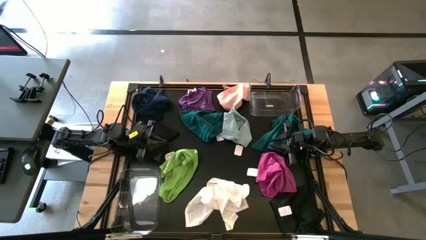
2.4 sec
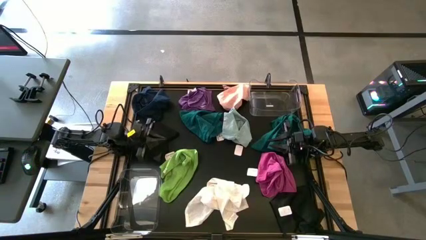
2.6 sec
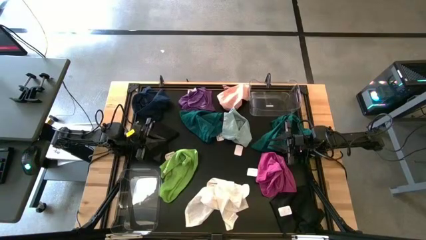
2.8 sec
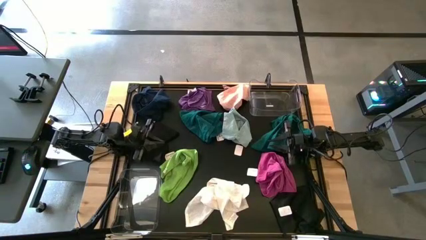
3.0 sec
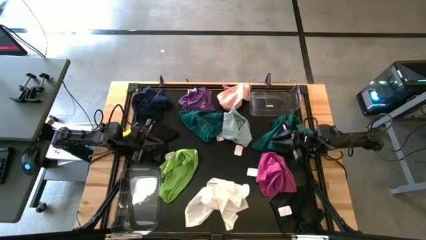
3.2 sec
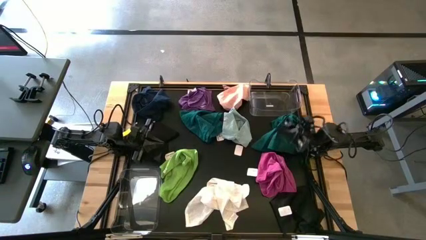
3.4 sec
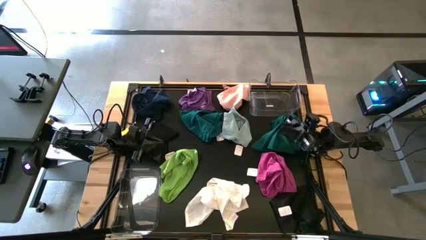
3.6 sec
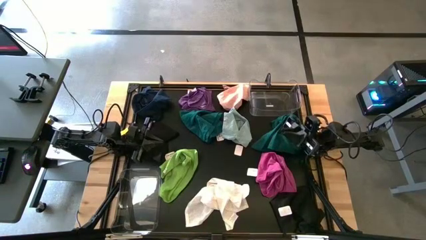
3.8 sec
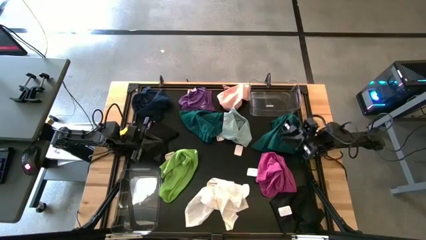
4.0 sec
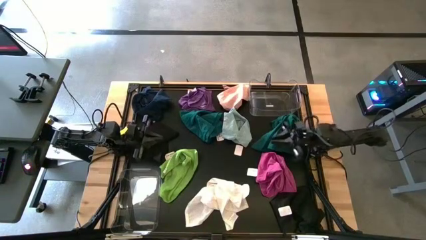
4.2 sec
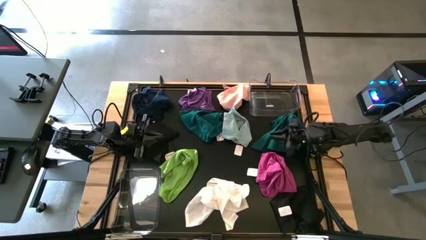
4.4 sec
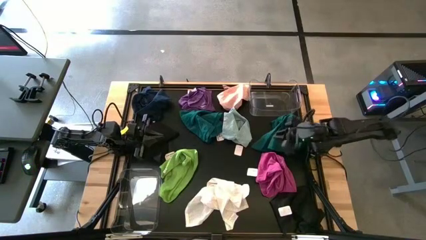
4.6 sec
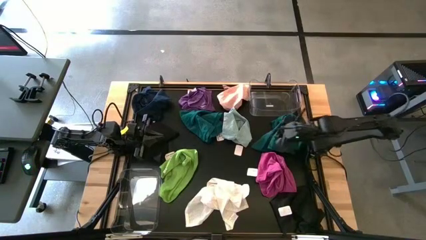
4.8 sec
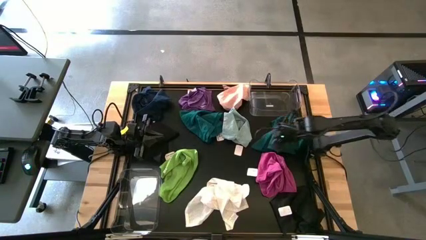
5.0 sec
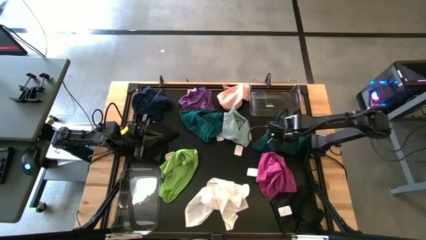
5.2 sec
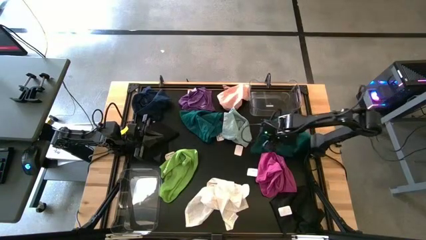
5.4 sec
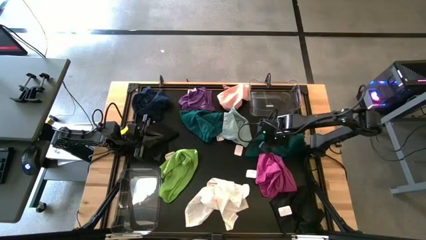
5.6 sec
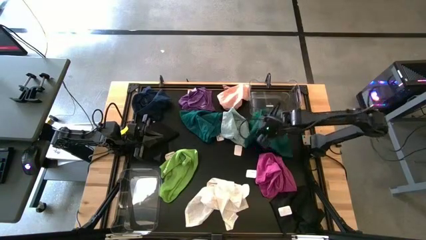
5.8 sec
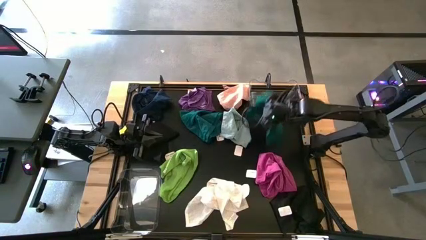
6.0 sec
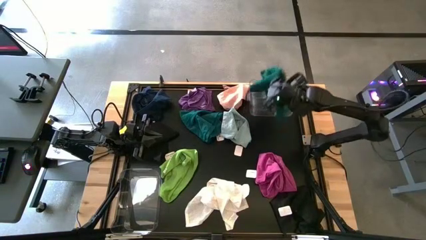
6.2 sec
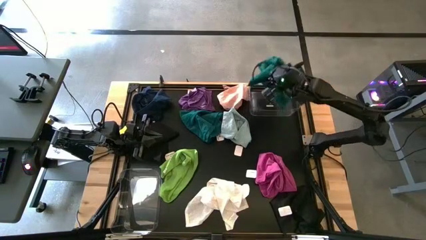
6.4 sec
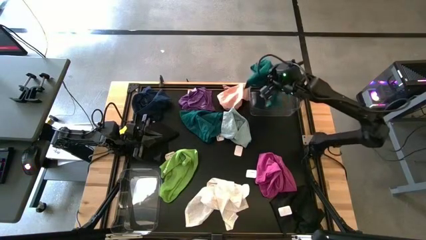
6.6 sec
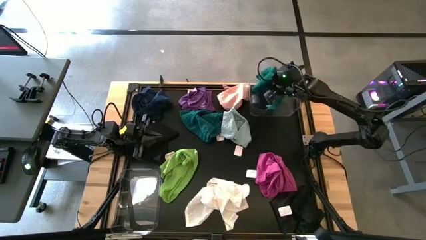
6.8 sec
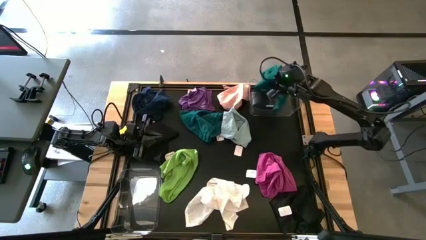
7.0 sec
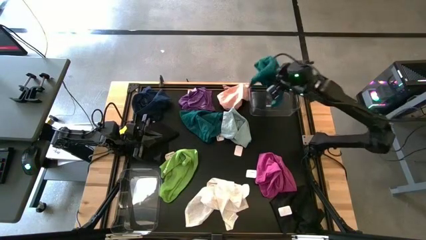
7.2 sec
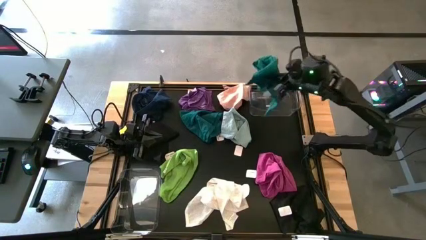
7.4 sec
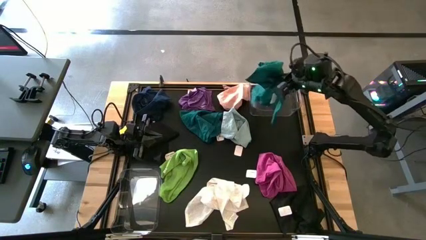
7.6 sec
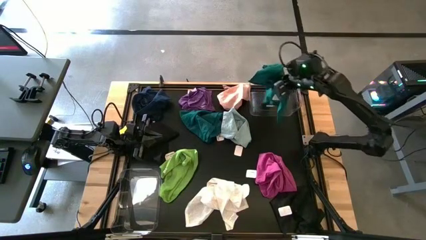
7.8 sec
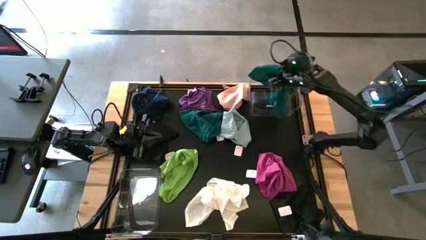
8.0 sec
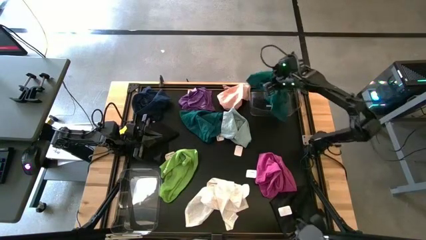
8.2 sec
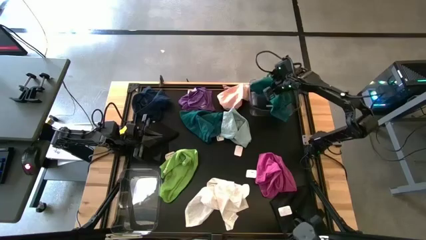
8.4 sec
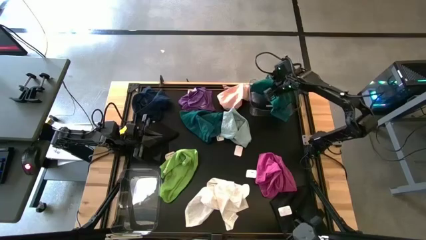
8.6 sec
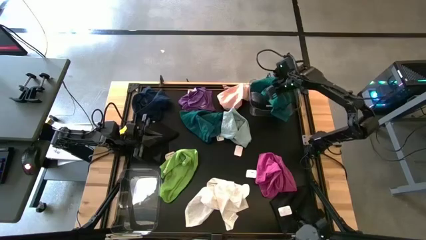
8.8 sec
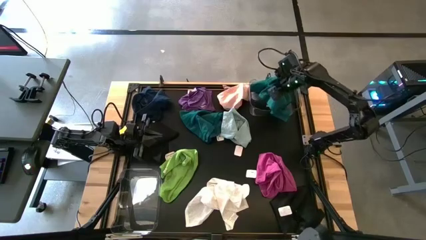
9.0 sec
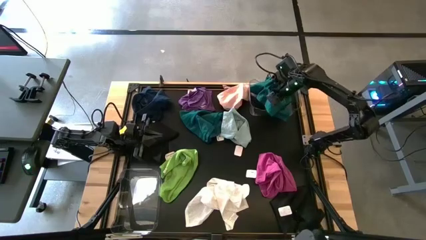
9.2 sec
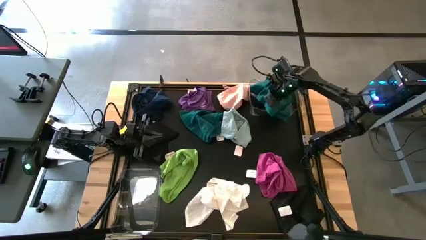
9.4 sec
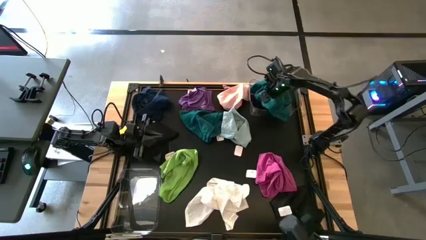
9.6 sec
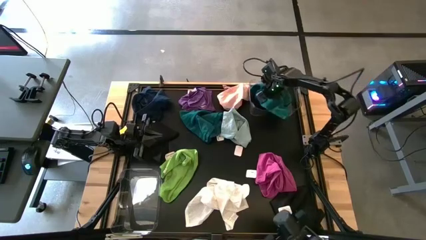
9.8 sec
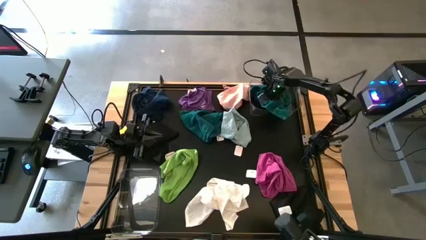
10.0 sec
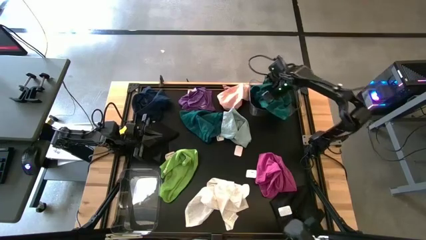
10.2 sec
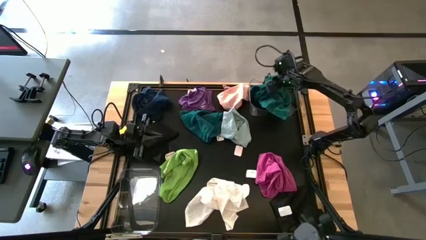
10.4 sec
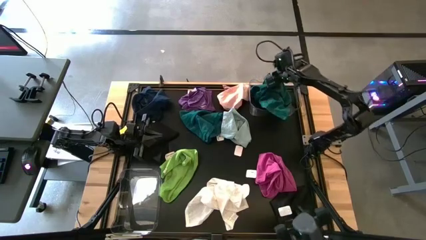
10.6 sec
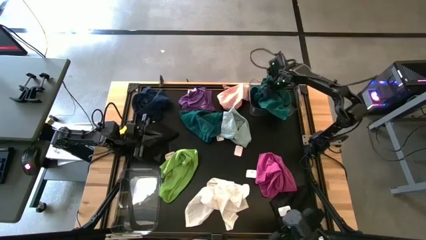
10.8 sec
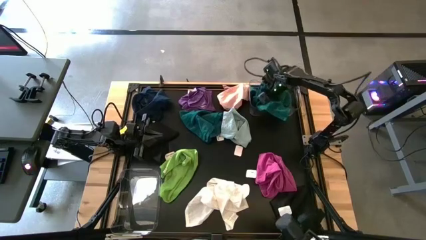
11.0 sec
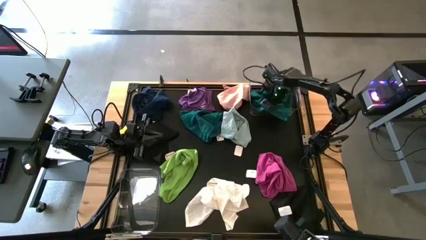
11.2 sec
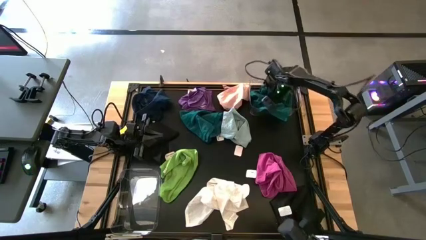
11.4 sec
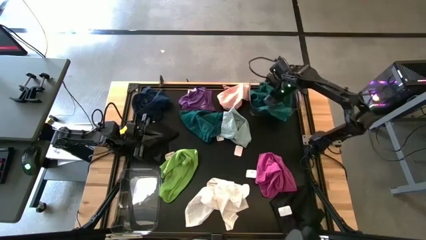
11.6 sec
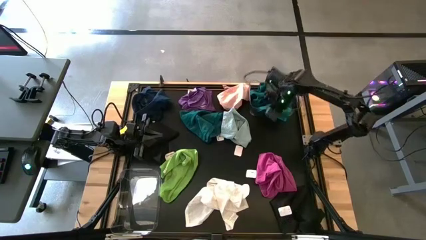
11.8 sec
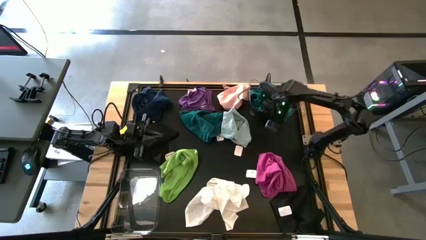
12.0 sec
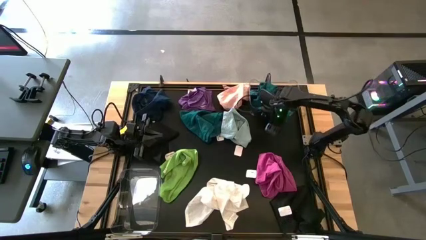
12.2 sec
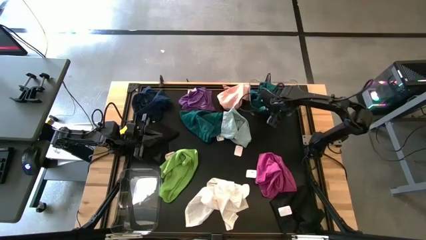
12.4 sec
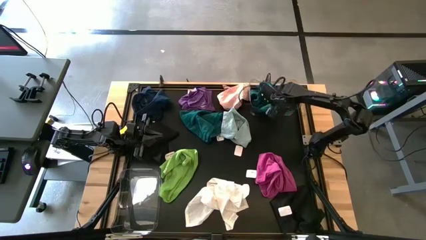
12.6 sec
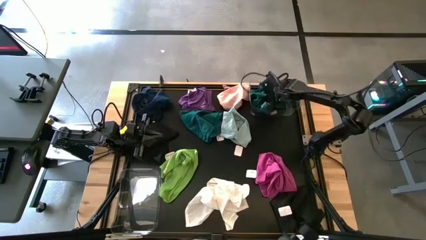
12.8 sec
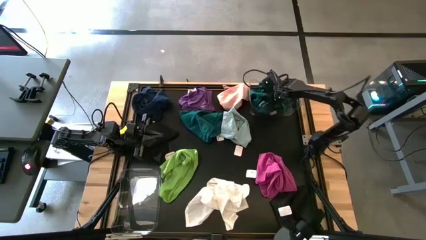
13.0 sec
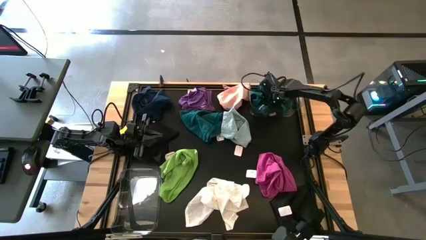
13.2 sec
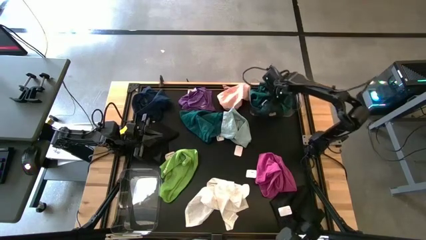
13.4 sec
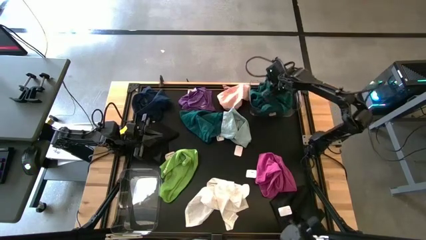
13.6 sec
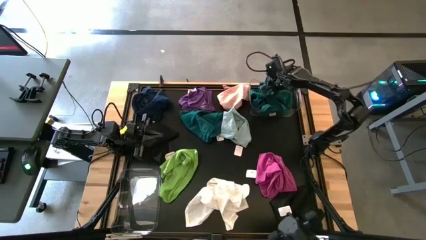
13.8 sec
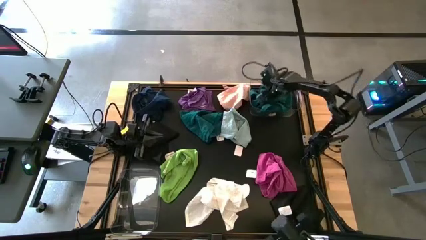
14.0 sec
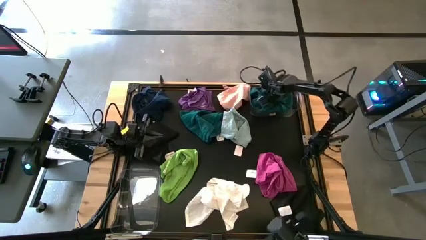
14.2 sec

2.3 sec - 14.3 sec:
Task: Sort towels by color in basket
Put the right dark green towel into the top transparent bin

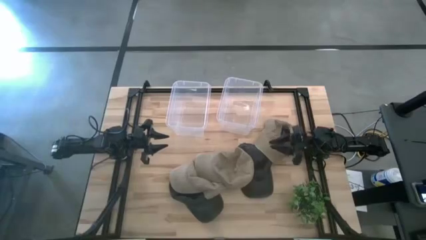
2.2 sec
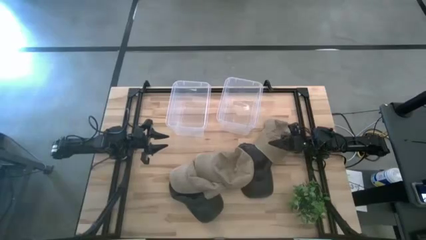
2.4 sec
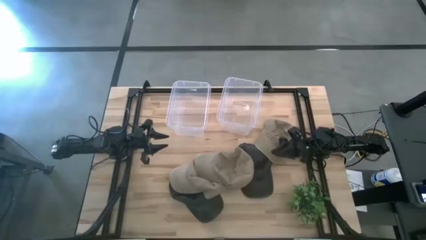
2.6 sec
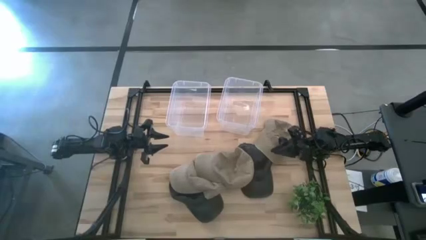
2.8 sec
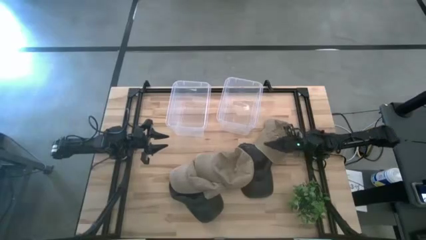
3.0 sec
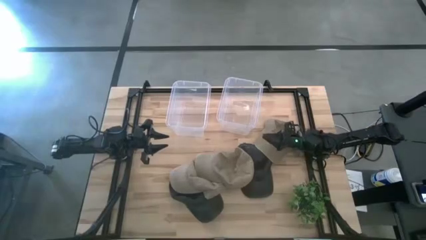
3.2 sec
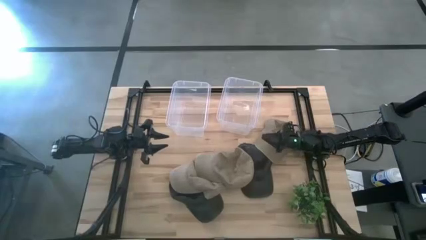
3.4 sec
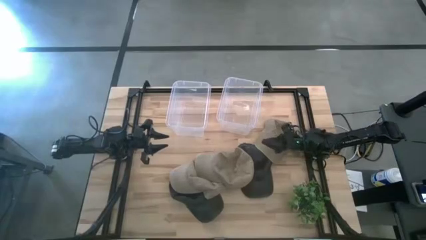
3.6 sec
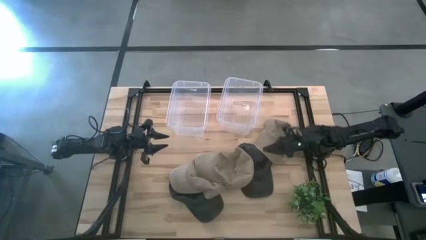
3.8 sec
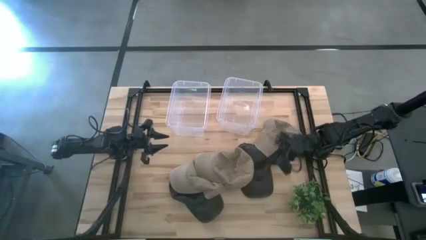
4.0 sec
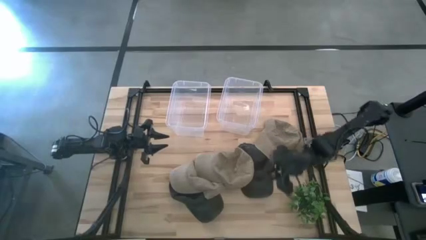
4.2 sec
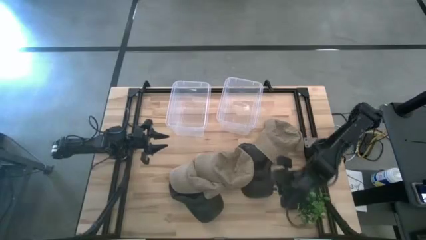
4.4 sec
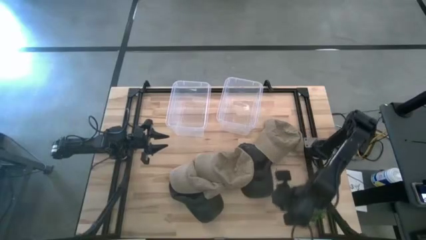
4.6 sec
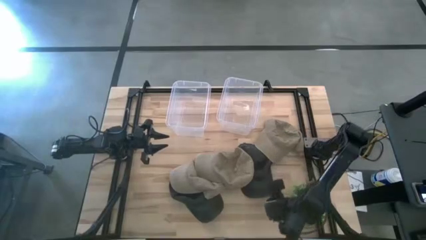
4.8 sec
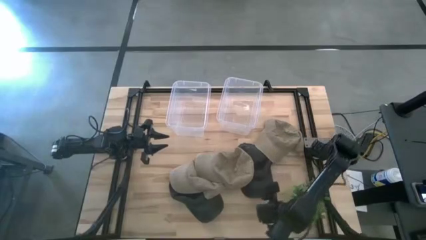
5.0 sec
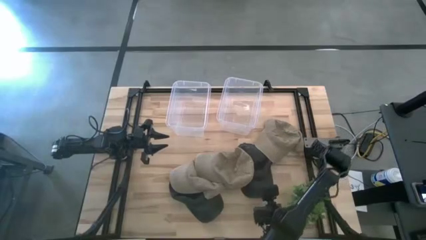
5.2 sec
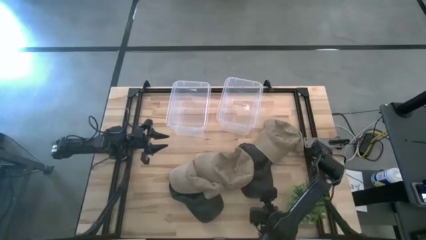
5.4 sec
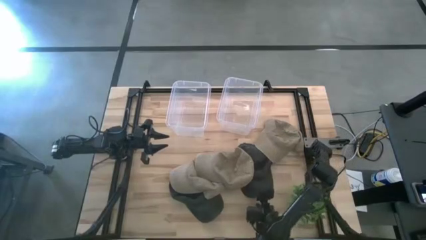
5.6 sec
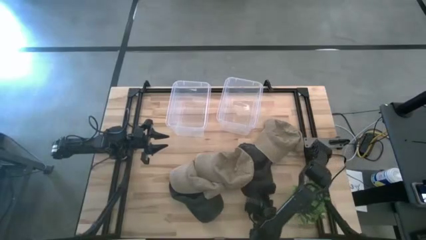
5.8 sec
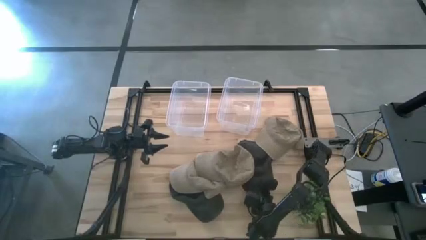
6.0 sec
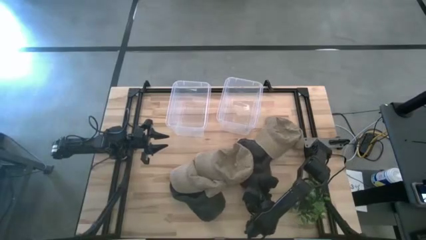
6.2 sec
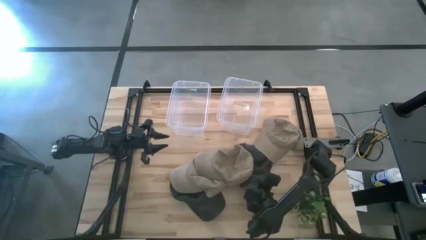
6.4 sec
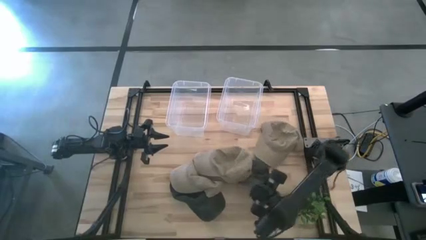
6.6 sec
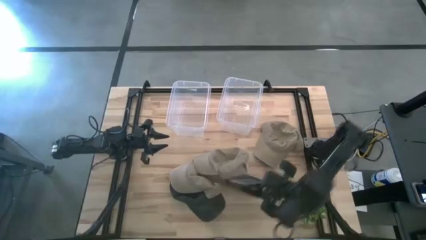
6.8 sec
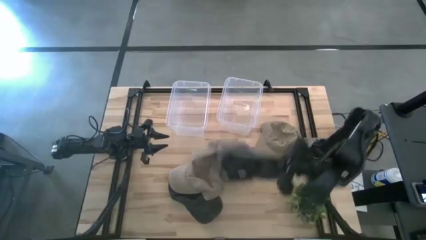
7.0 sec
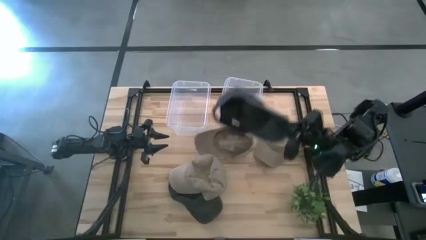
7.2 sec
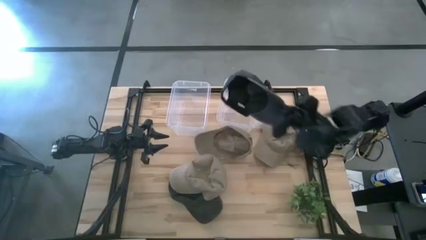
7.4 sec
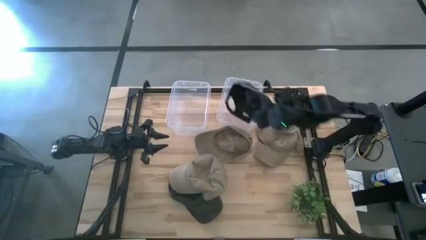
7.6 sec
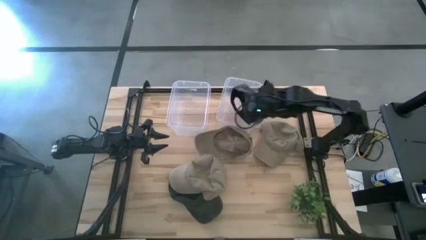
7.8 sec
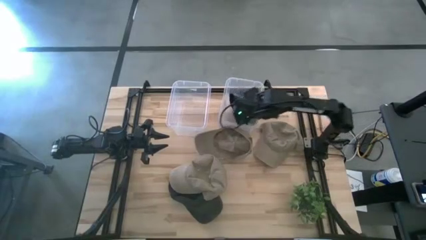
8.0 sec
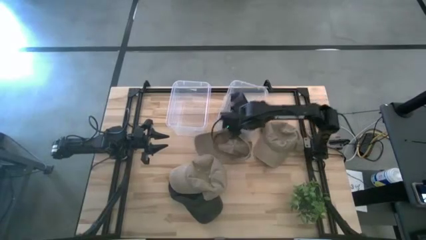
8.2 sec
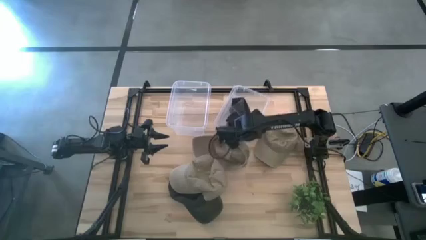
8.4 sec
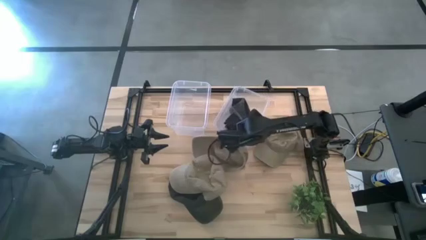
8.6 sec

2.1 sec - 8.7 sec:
Task: Pick & Place hat
Put the right black cap into the right transparent bin
